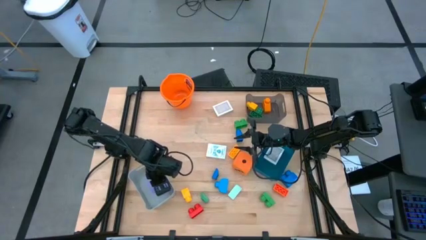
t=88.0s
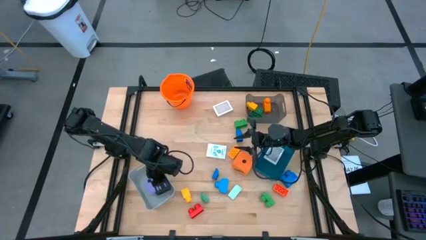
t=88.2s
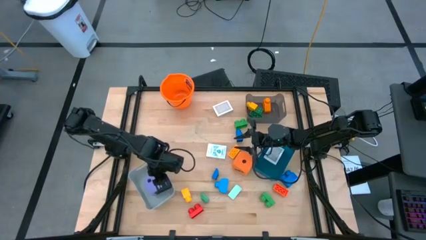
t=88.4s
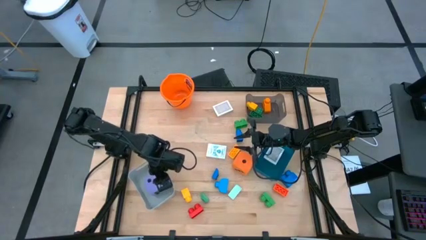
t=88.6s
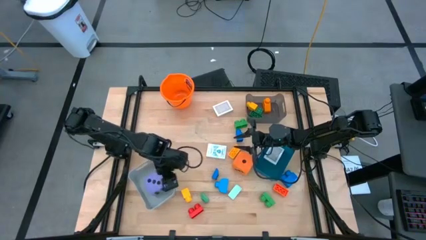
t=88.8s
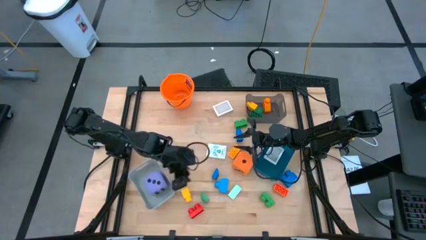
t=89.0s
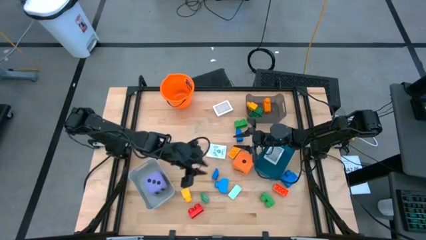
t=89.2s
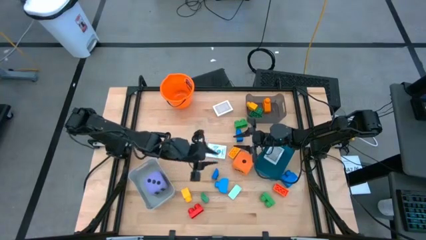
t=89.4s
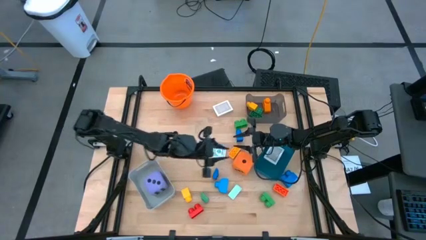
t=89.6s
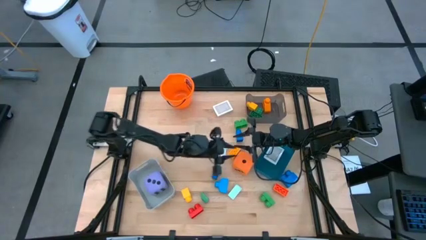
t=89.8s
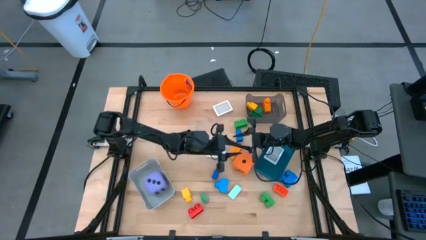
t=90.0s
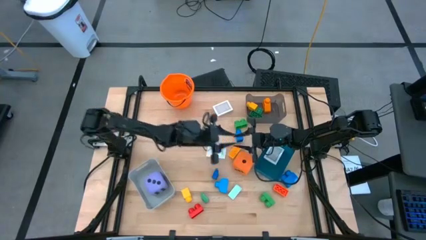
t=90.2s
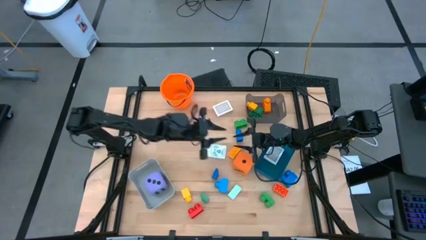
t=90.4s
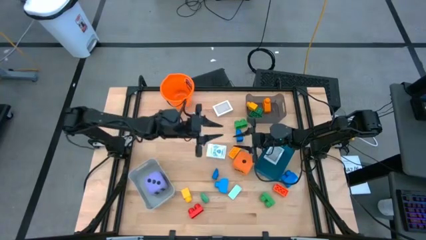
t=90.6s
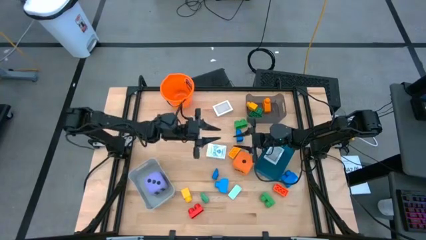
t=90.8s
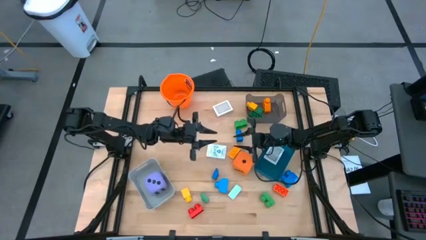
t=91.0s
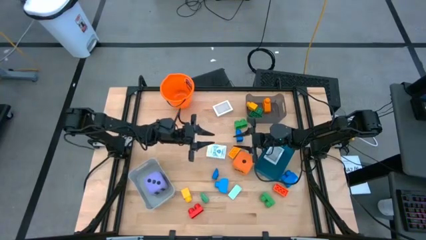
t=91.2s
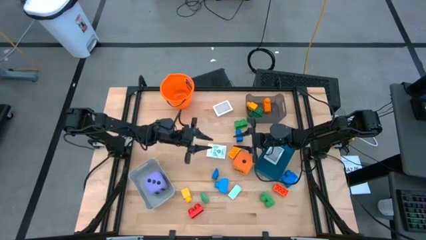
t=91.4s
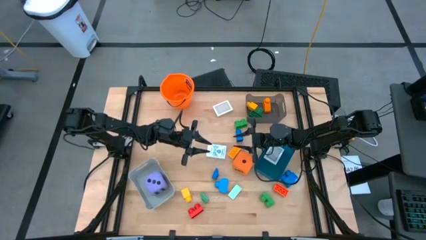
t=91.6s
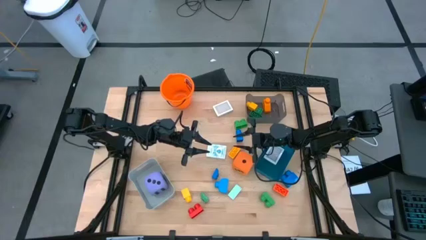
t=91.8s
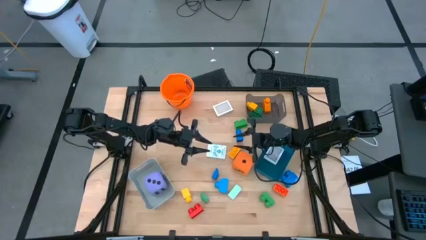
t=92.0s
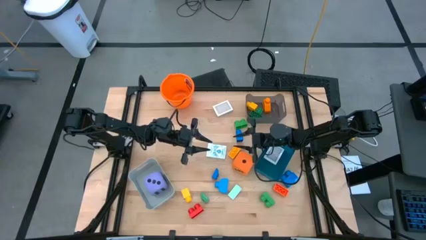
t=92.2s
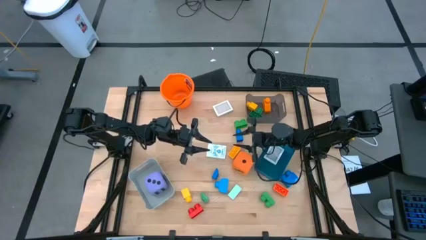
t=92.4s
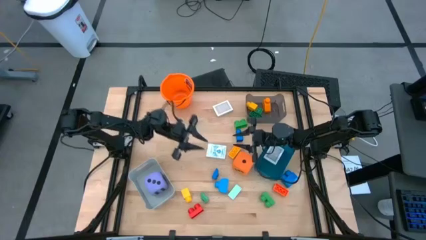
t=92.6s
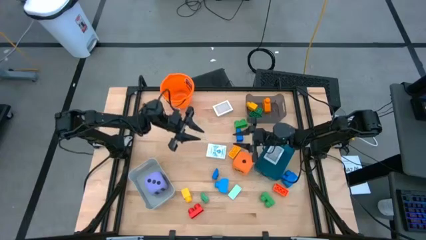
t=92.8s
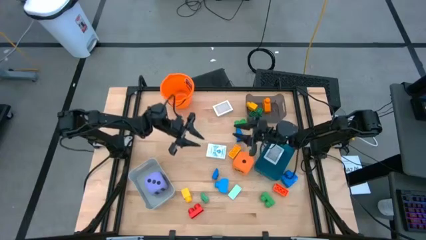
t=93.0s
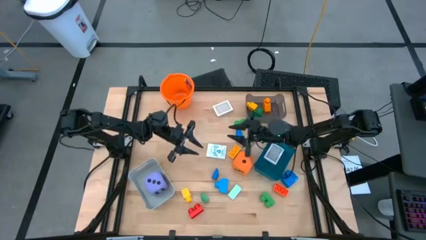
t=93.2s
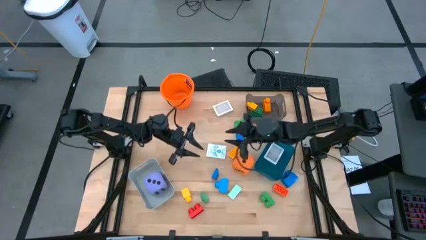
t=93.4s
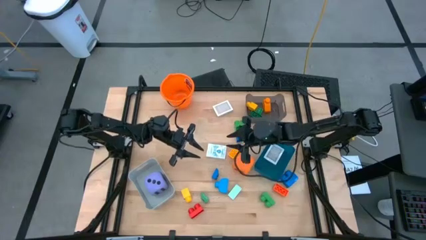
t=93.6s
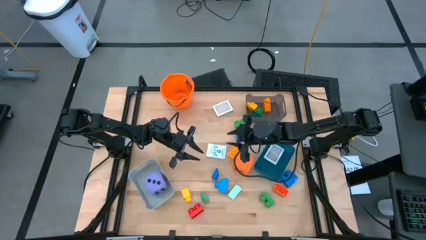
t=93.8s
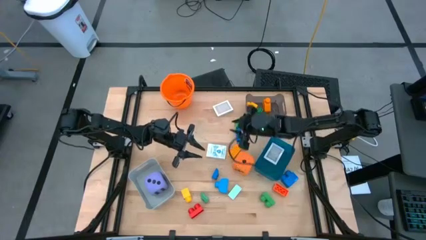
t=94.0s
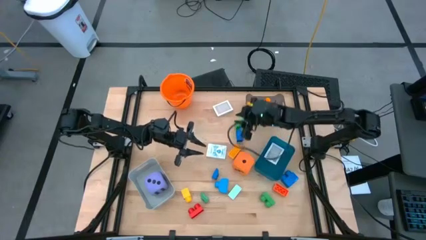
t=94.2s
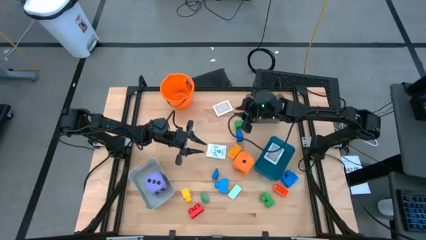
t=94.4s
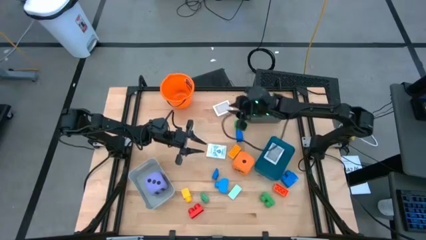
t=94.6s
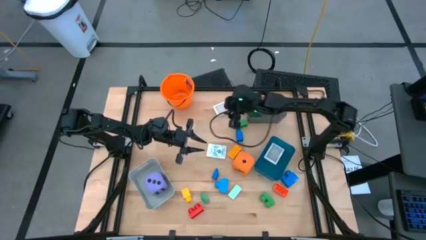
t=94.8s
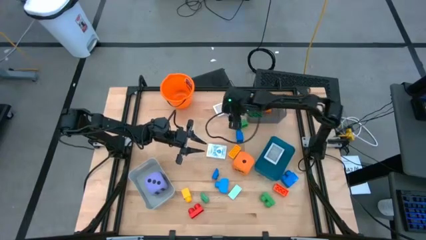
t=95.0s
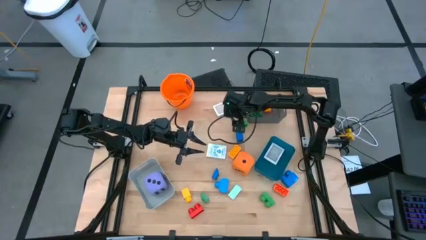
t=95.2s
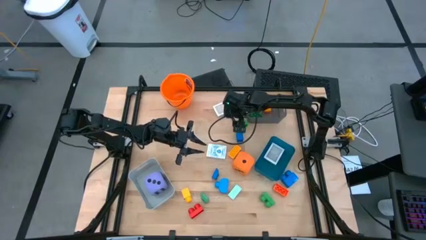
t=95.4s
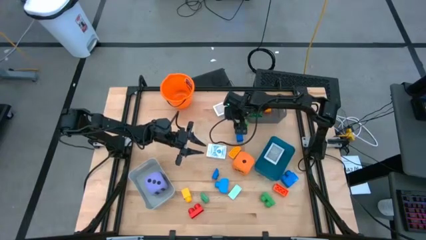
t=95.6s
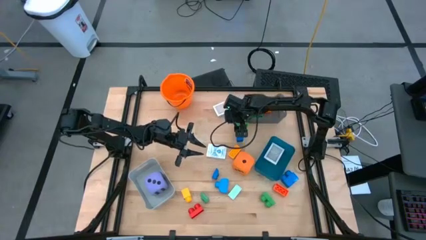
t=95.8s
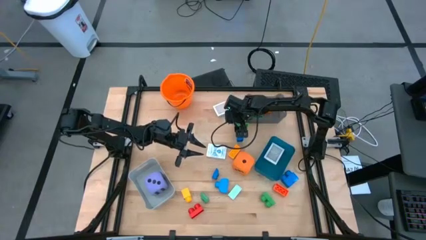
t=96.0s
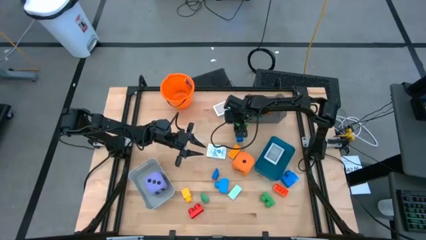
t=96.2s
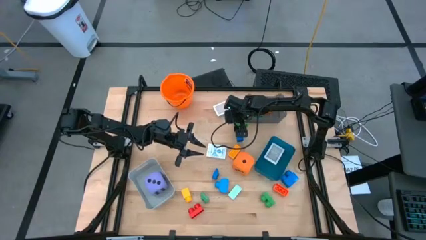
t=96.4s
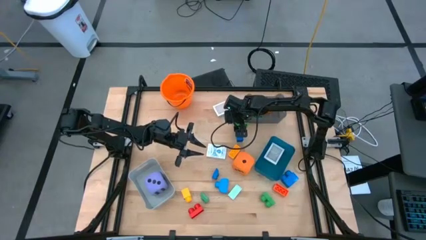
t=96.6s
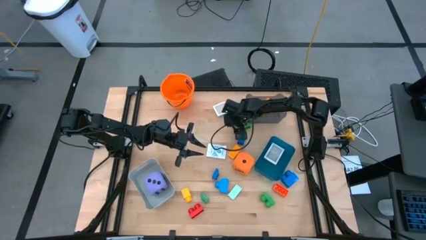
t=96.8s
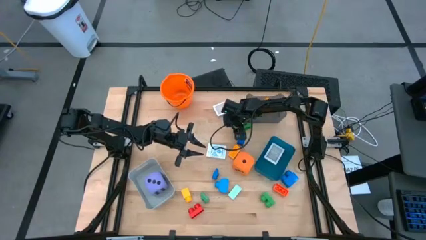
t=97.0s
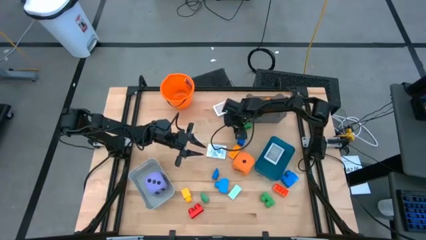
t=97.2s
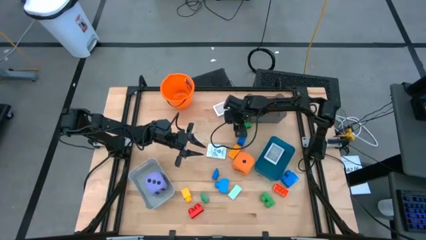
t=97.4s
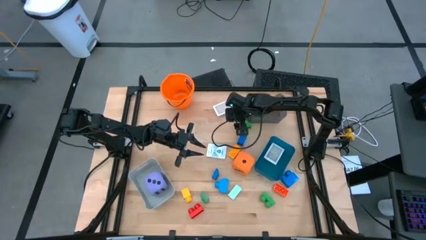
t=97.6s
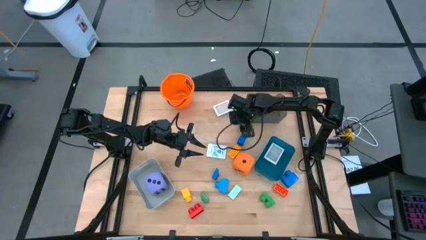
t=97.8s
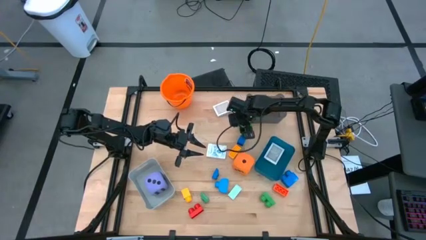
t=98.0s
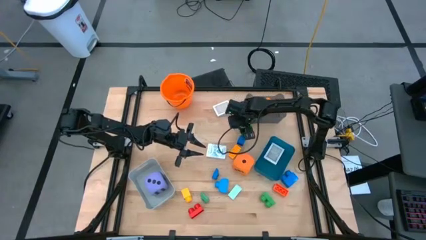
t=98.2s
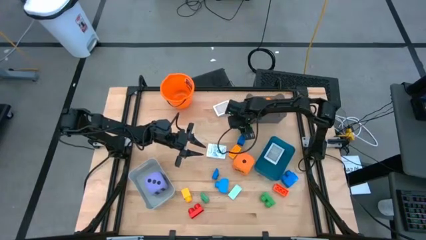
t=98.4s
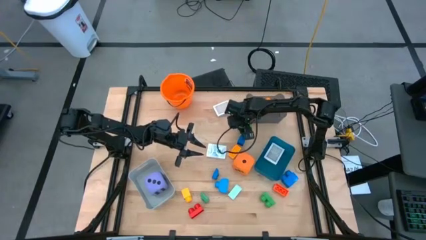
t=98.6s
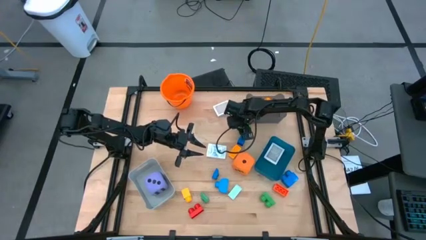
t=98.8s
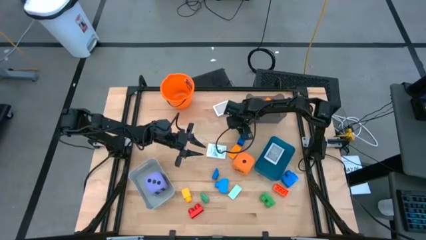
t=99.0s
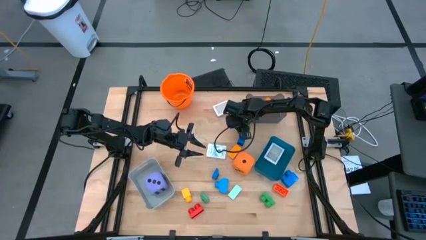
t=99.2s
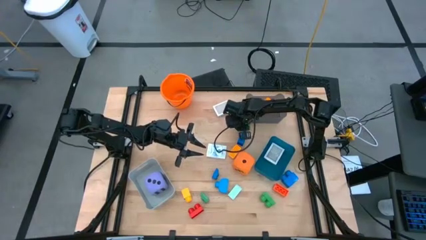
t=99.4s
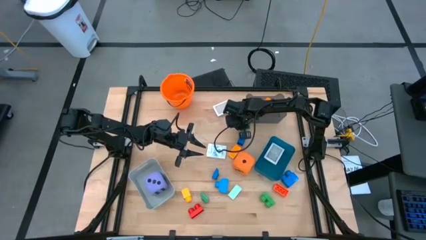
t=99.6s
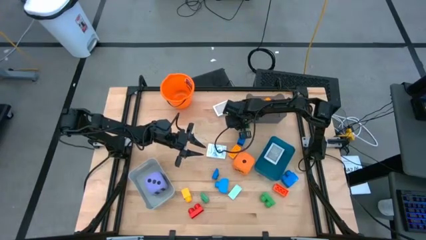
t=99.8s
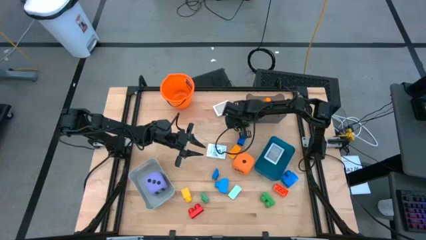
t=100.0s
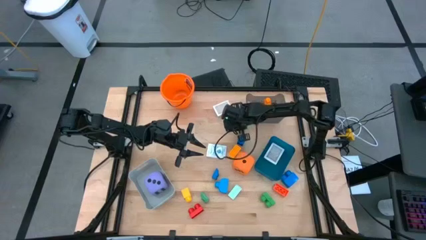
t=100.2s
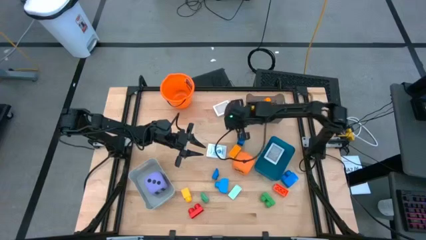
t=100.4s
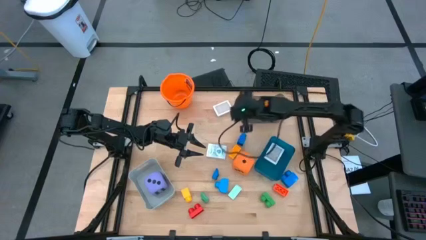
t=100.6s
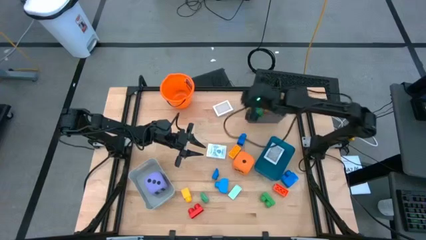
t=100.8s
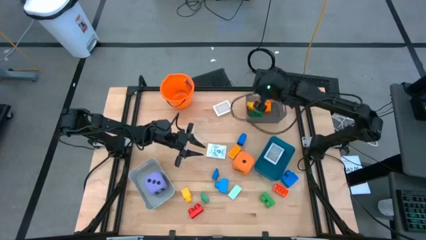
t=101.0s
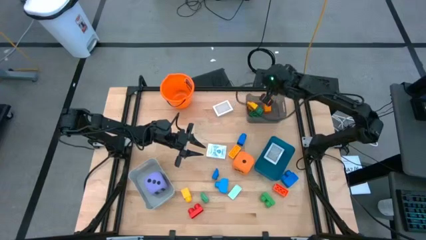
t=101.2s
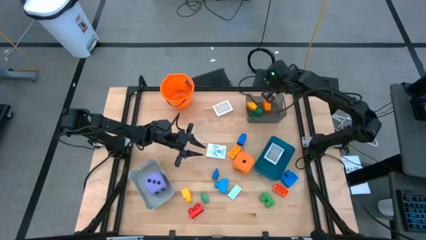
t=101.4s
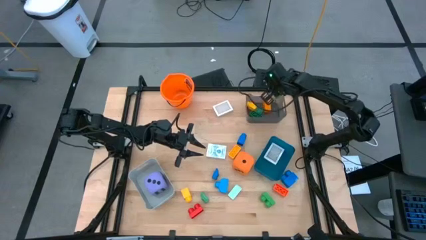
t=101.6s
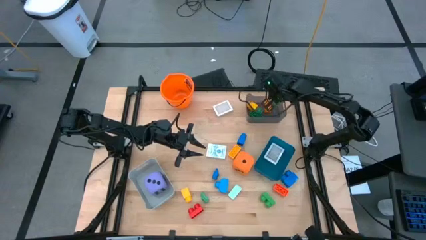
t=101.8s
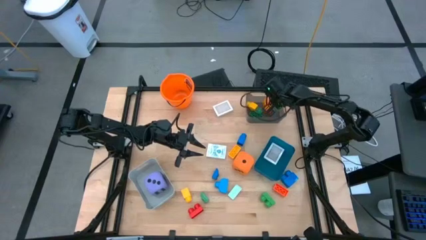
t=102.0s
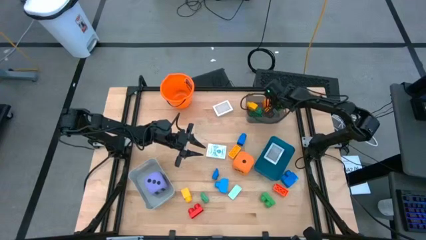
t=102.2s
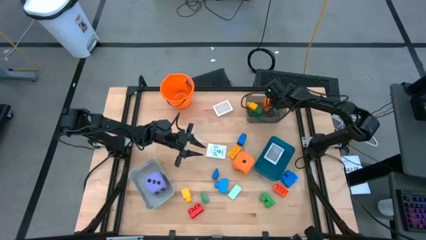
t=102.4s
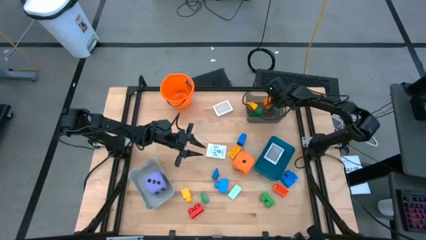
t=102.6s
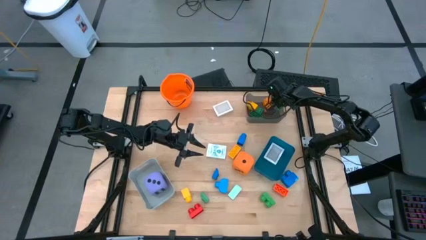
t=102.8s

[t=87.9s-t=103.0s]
Task: Pick & Place Toys
Put the green game piece into the black bin
